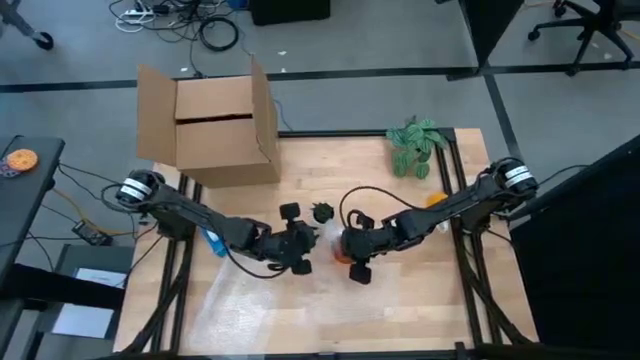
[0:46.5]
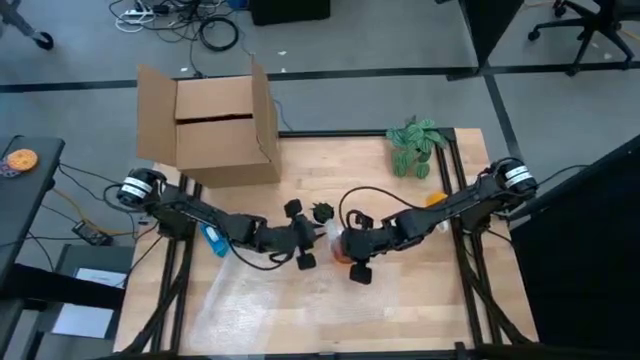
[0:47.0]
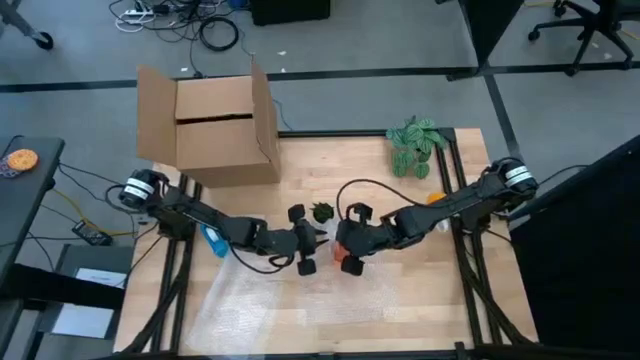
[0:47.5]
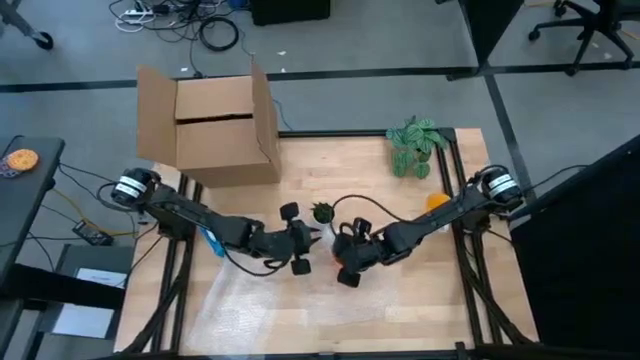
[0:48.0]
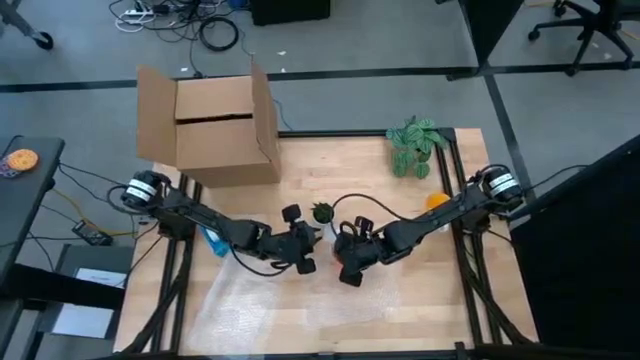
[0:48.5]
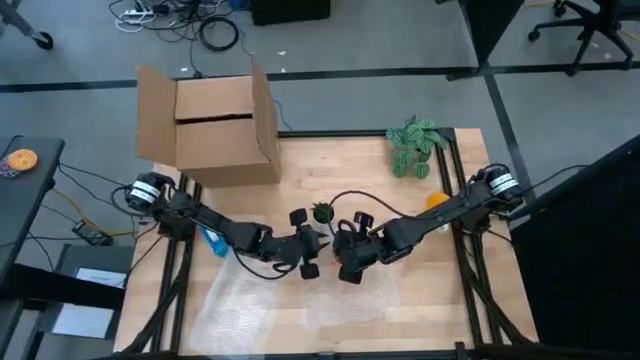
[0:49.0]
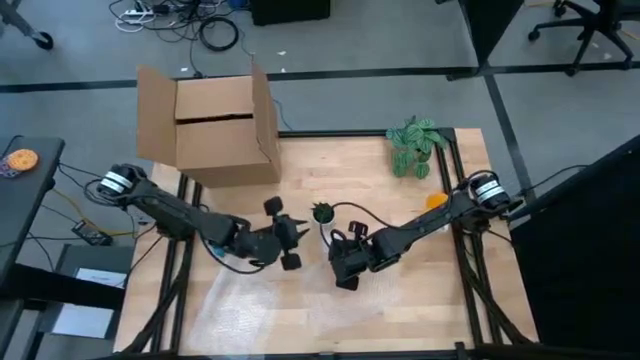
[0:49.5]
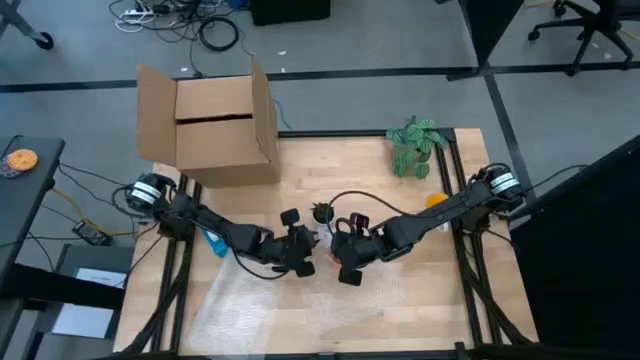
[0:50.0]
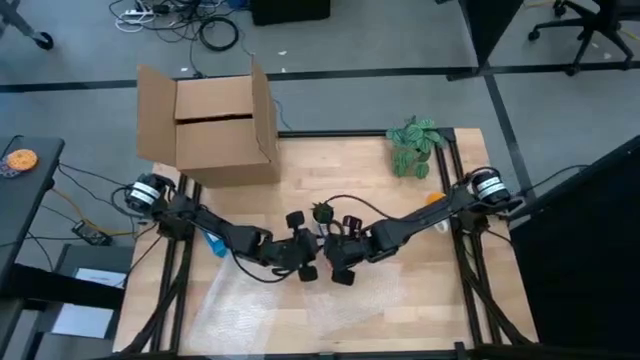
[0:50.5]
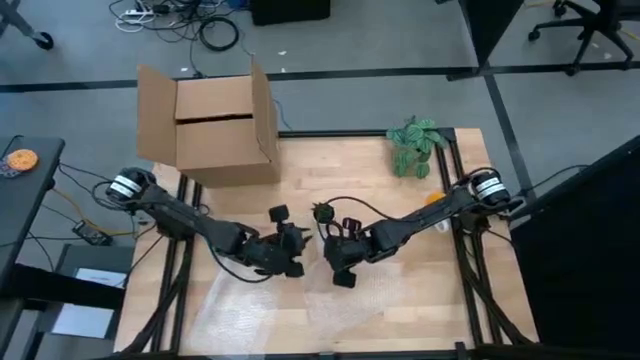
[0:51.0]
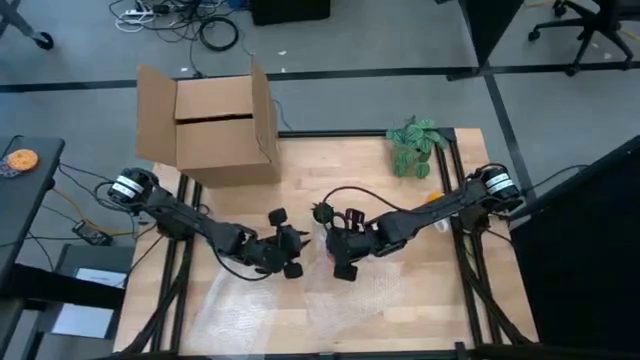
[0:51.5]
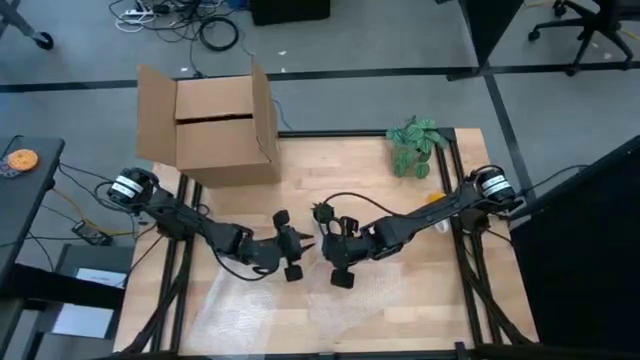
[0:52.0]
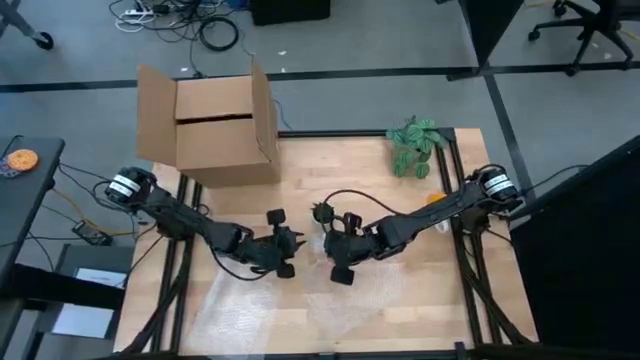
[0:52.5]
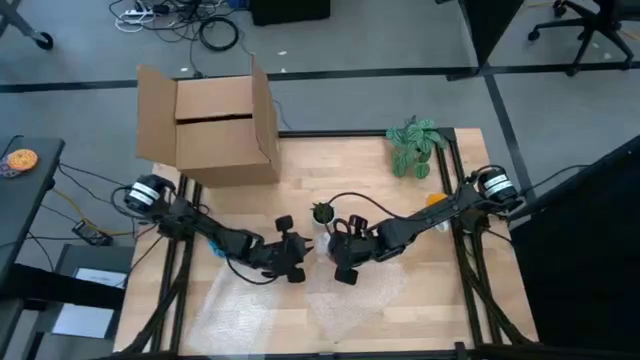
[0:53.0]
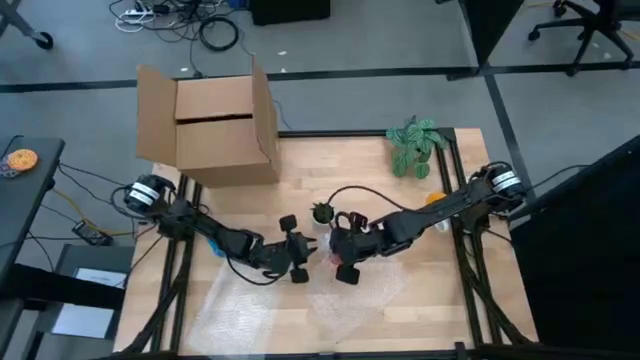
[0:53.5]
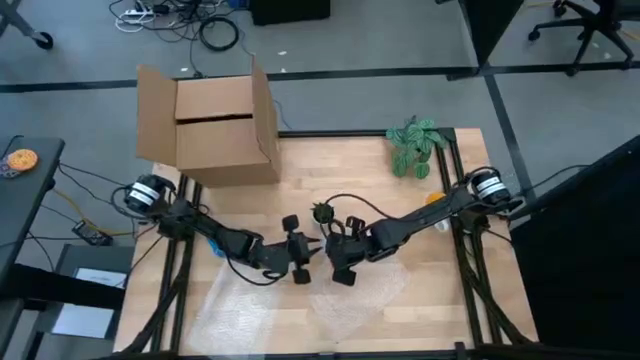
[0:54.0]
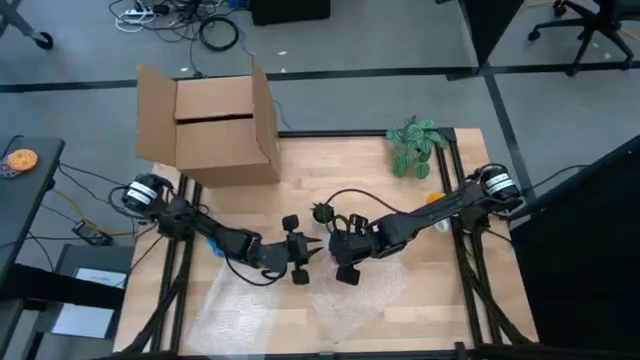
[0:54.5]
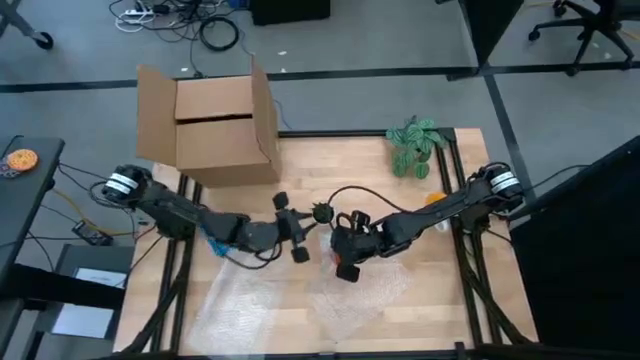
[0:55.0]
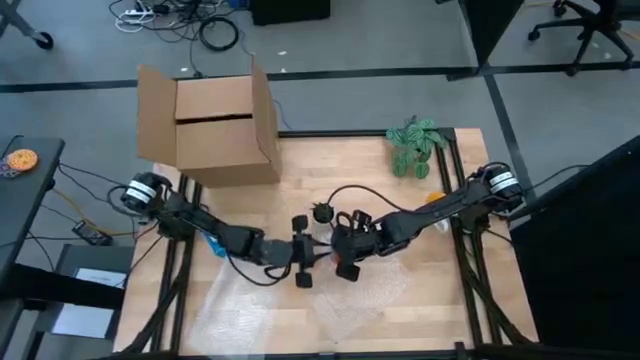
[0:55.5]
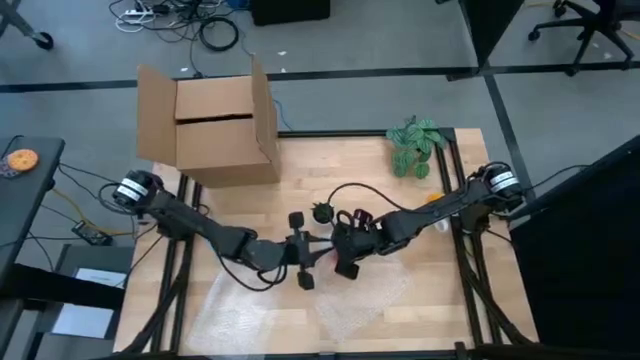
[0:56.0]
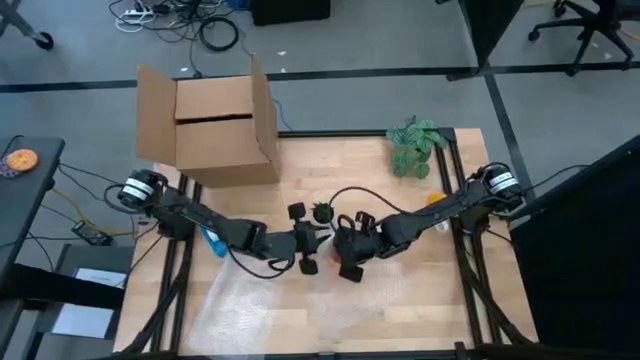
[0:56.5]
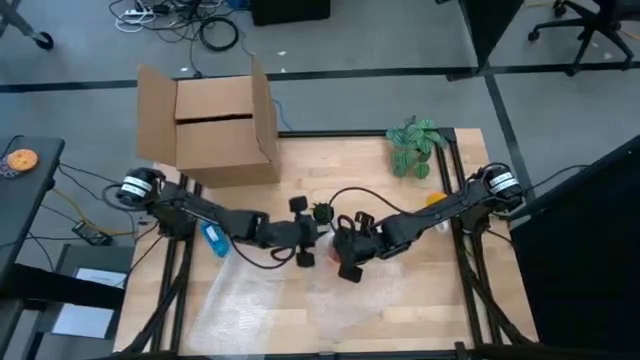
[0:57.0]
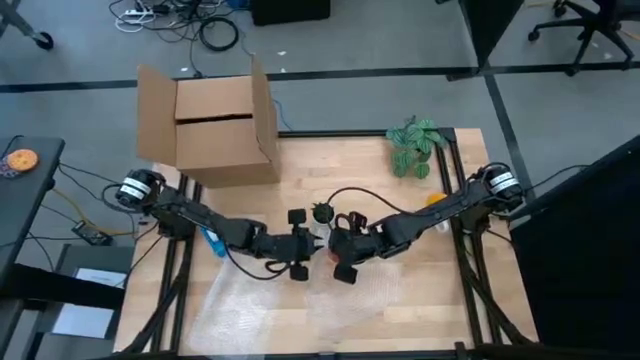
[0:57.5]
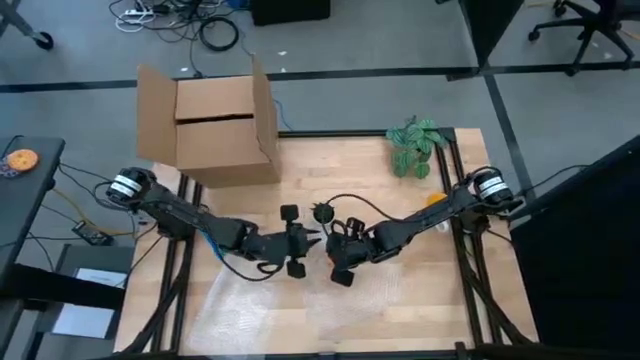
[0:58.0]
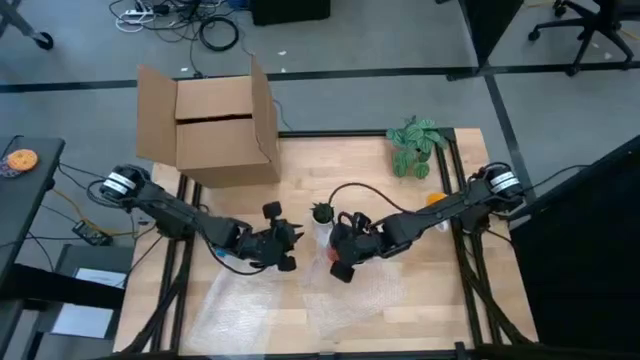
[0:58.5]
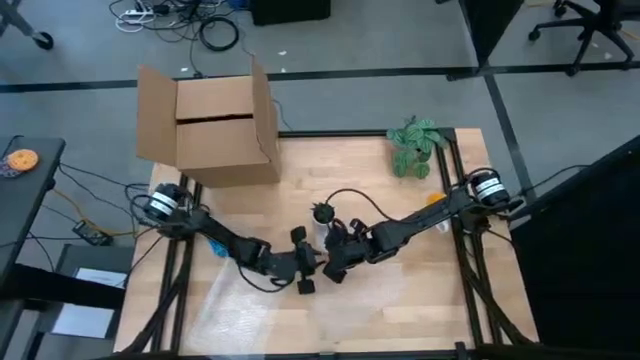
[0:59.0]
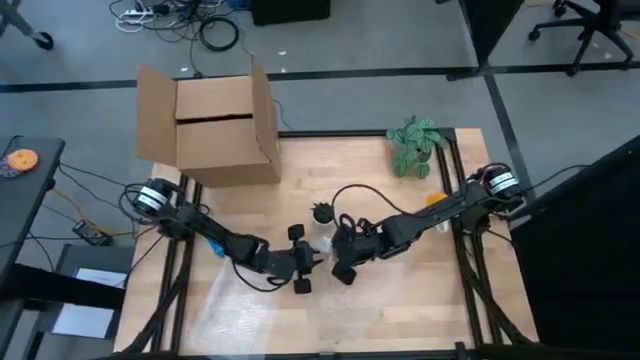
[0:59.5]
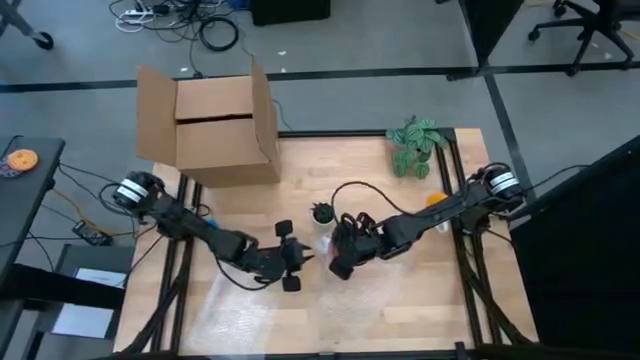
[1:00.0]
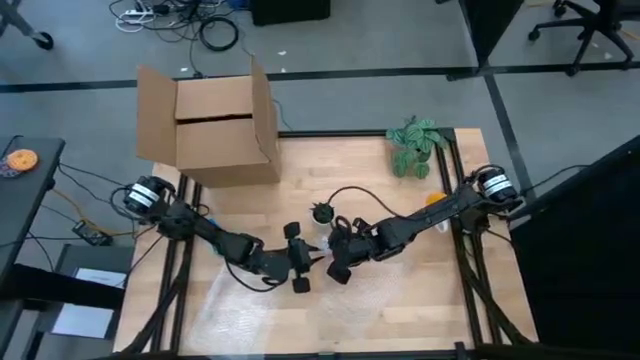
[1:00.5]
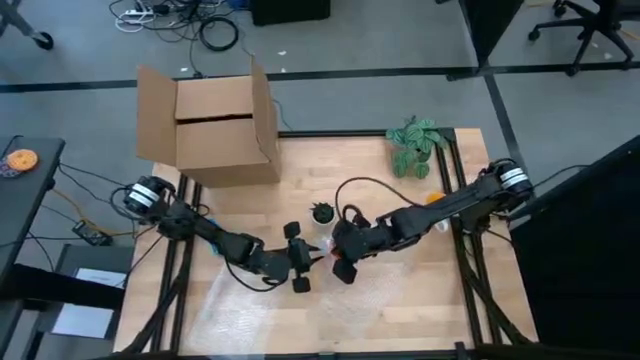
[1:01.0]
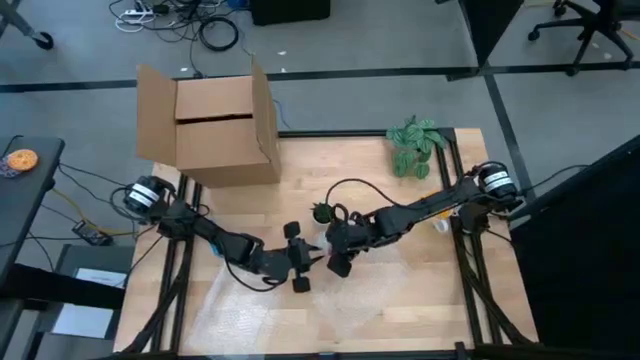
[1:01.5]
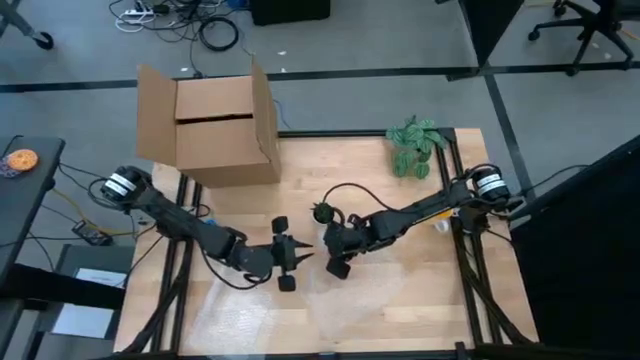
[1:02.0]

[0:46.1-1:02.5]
Task: wrap mug
Wrap the orange mug with the transparent bubble wrap

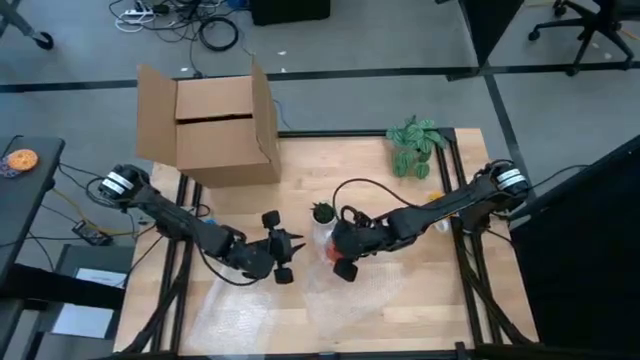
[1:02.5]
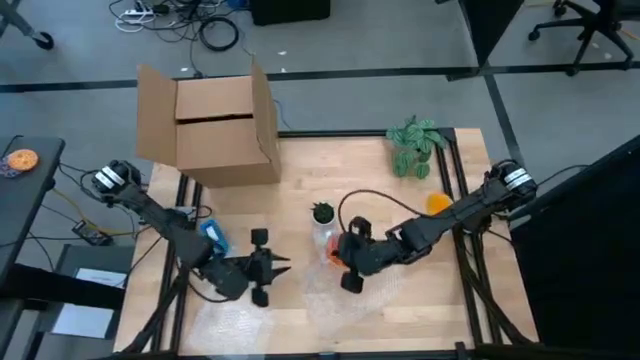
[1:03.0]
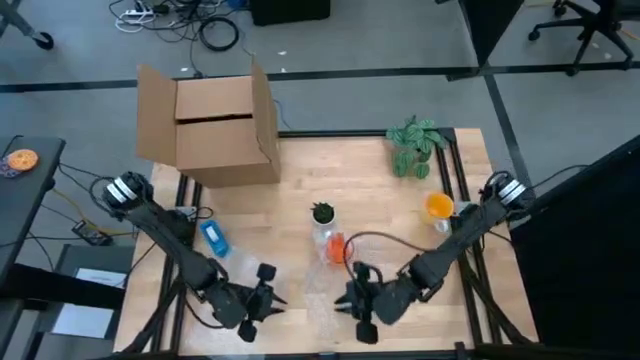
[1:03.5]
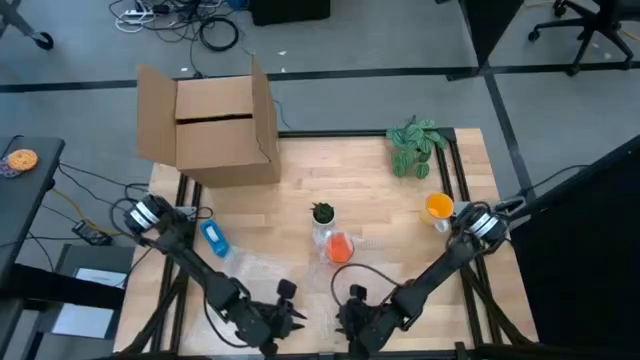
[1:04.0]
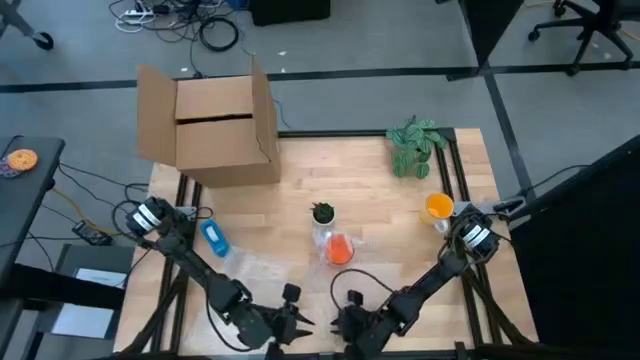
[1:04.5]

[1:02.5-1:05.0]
Wrap the orange mug with the transparent bubble wrap
